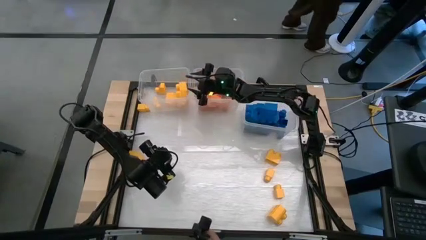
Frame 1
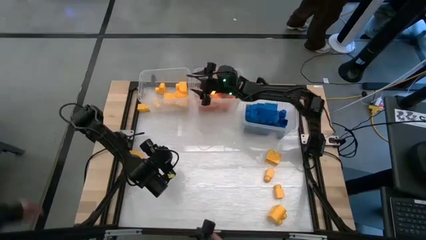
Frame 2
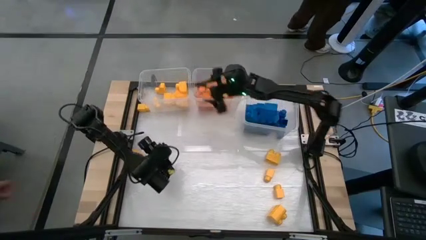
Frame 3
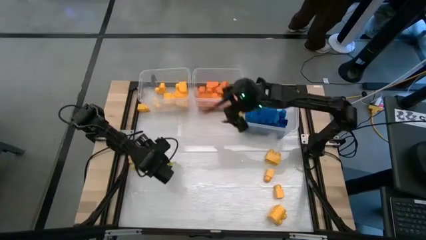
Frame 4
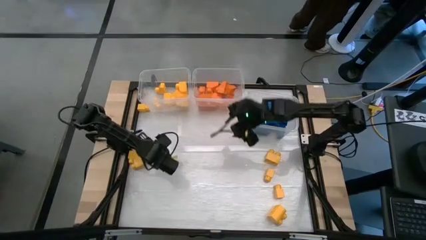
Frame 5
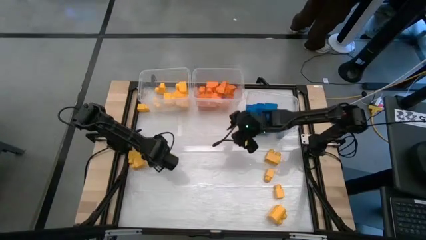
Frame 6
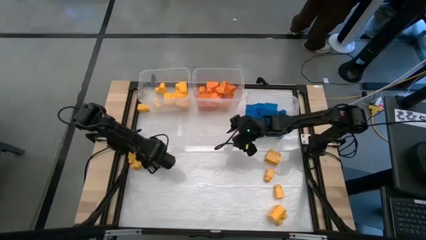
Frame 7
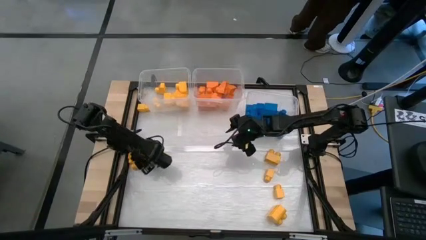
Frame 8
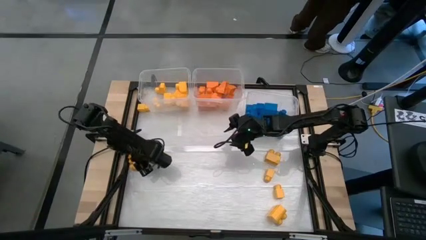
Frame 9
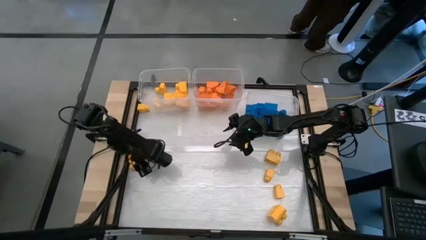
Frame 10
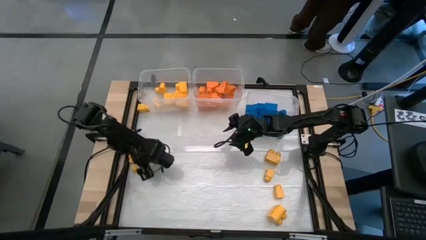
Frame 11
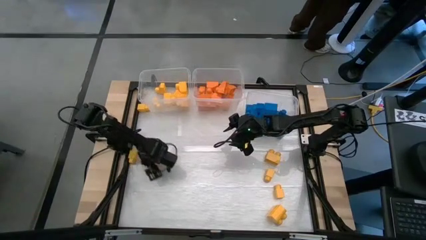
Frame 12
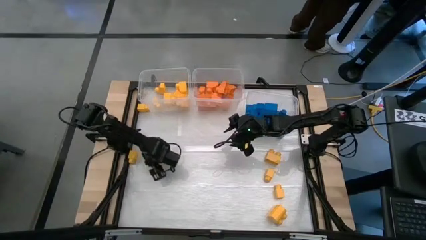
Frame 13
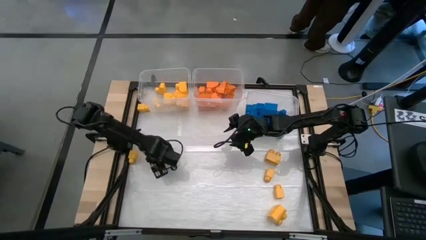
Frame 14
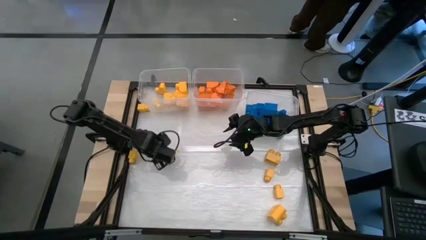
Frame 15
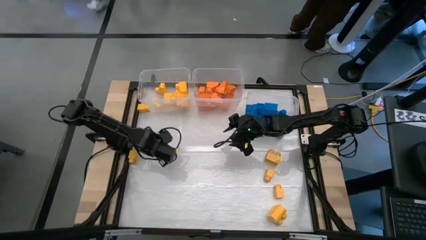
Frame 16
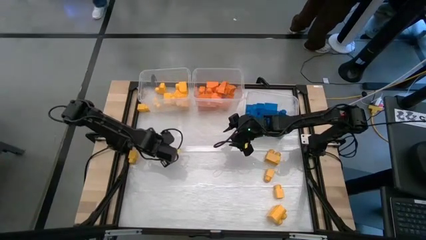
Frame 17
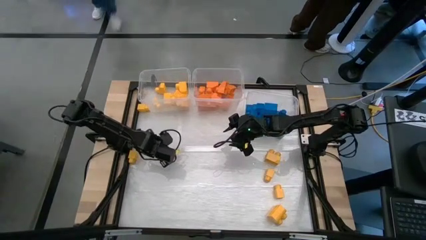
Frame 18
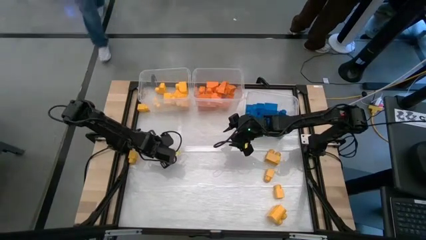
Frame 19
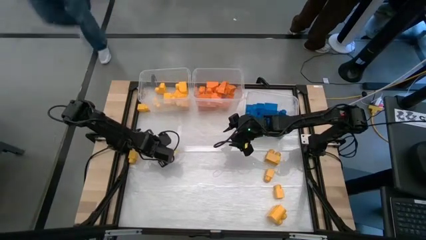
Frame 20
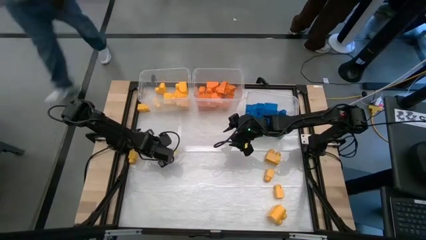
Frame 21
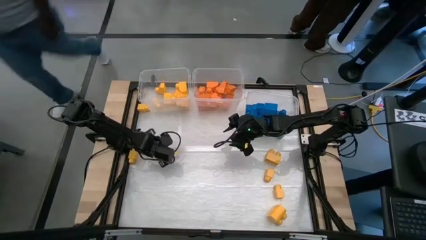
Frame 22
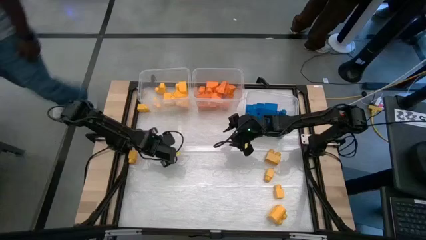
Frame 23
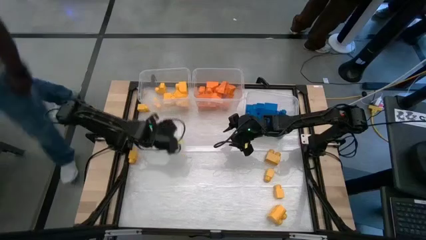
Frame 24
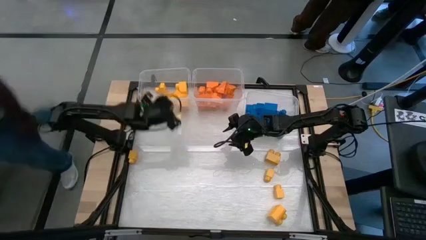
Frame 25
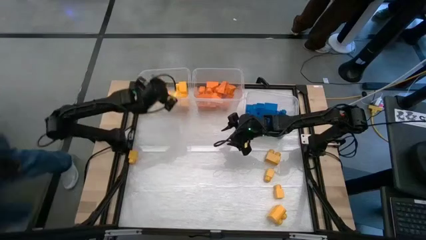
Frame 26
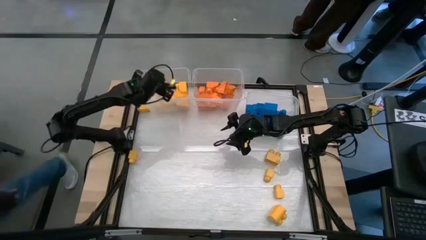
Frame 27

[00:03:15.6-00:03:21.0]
Task: Sort blocks
Put the yellow game piece into the left transparent bin

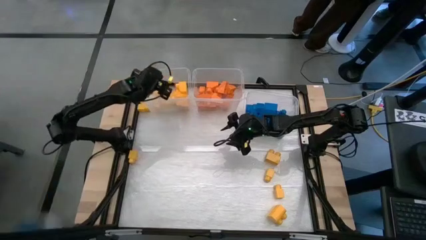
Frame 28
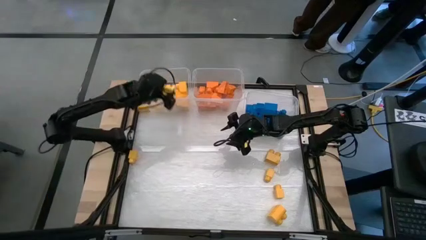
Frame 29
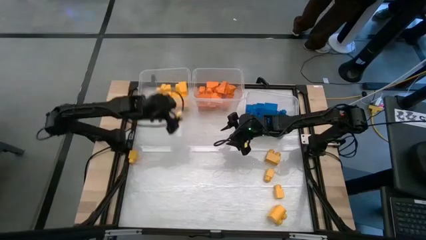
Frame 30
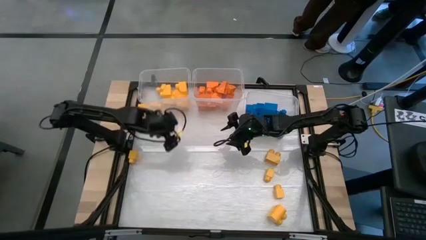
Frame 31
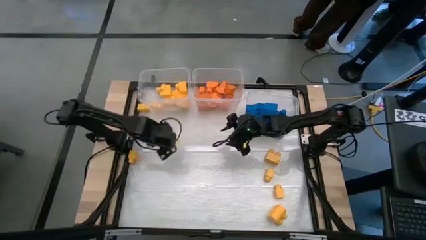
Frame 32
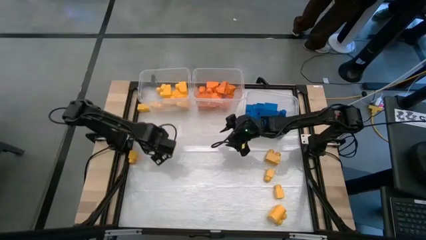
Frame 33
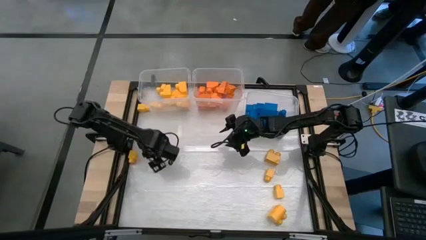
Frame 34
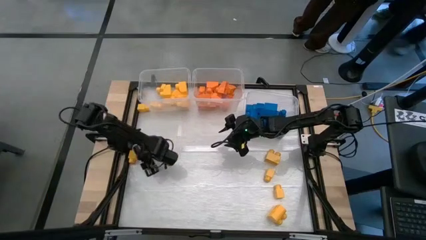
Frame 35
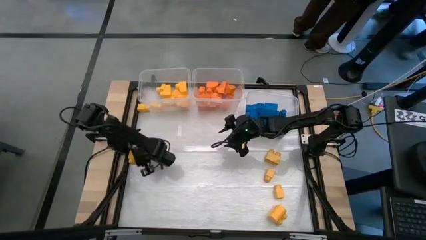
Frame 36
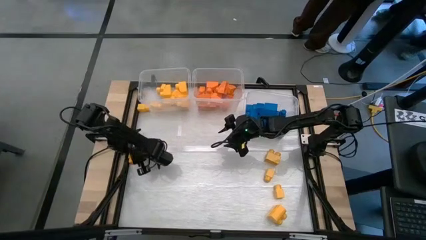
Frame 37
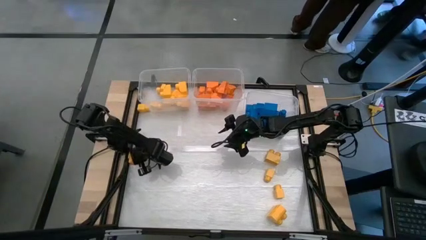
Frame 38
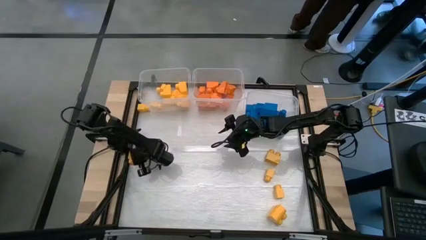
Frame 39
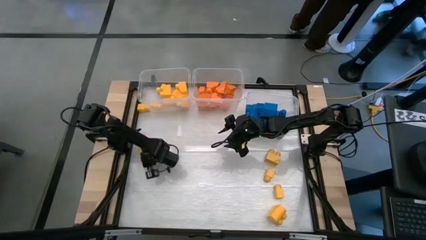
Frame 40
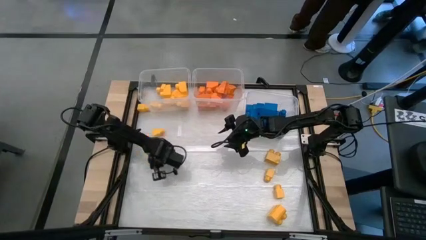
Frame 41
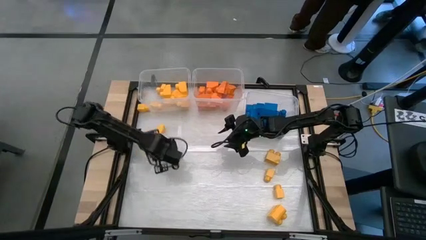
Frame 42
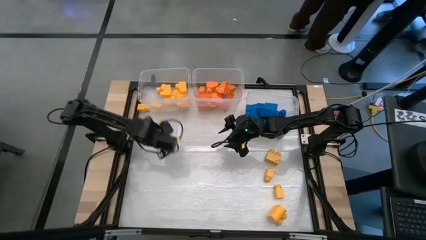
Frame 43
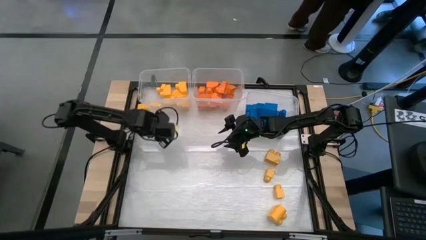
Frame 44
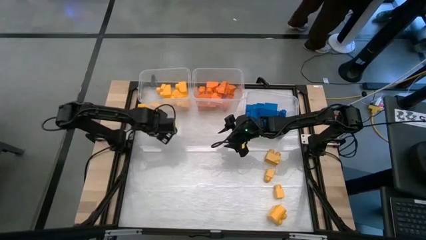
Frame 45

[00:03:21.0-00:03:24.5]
Put the yellow game piece into the left transparent bin

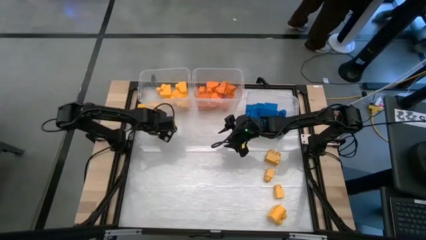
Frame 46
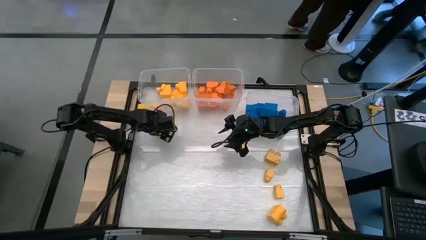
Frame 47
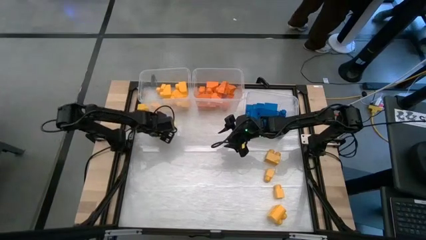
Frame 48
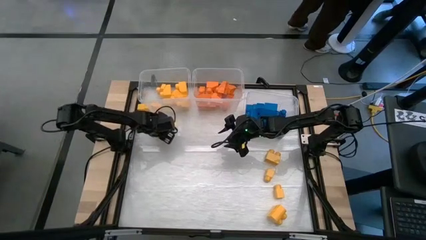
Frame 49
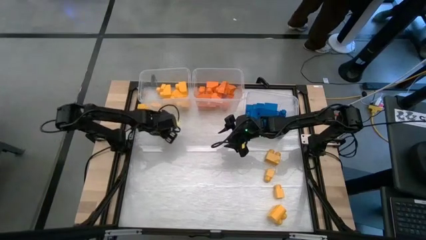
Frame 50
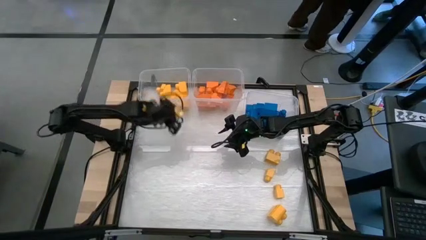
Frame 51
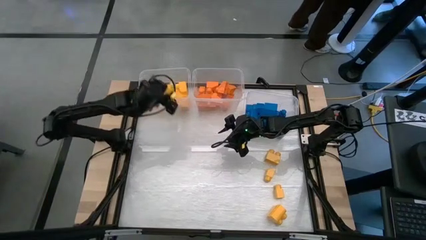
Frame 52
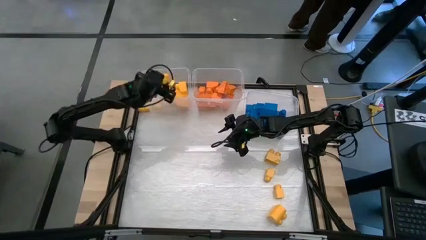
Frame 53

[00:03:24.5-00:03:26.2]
Put the yellow game piece into the left transparent bin

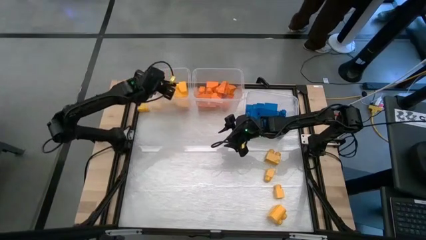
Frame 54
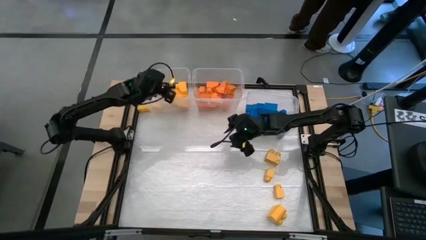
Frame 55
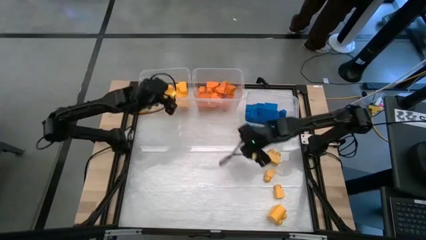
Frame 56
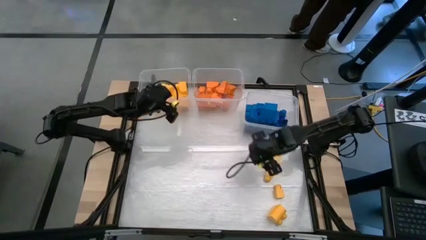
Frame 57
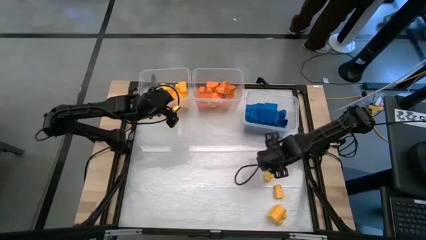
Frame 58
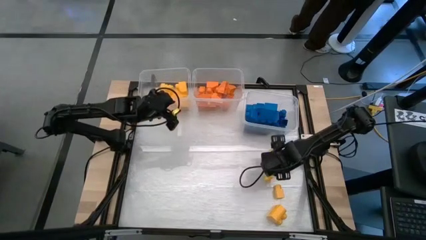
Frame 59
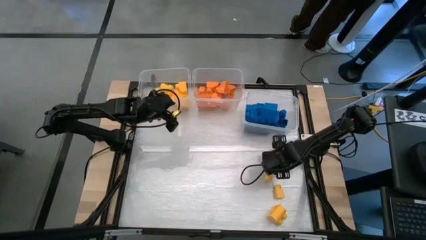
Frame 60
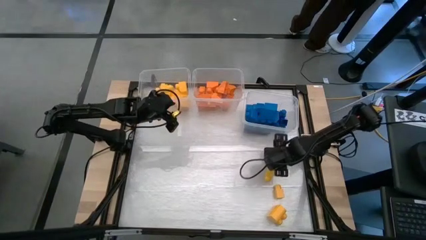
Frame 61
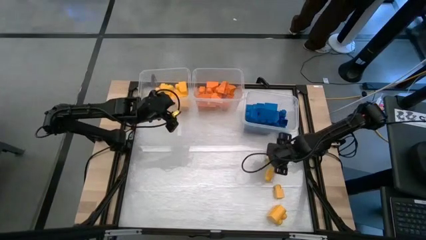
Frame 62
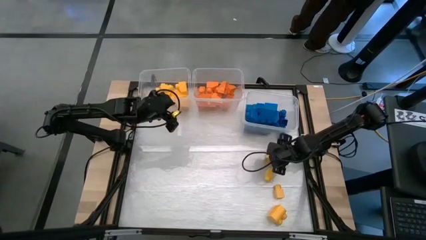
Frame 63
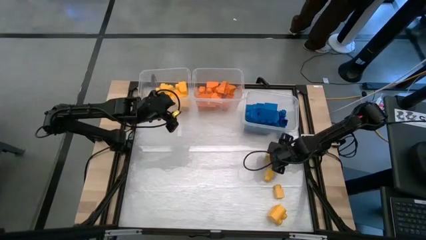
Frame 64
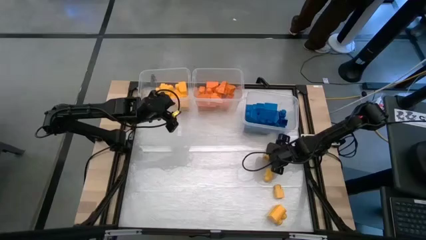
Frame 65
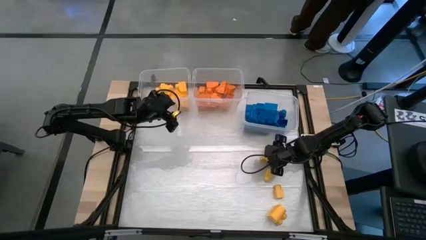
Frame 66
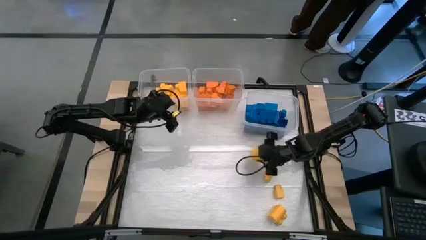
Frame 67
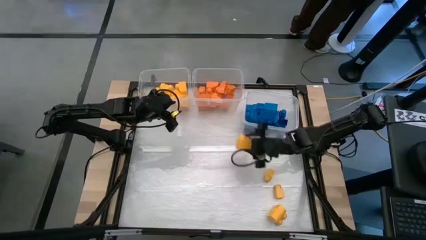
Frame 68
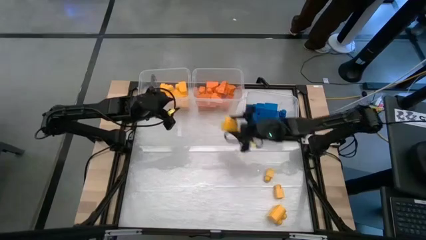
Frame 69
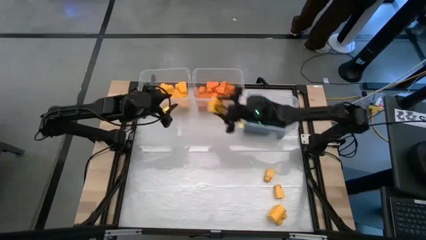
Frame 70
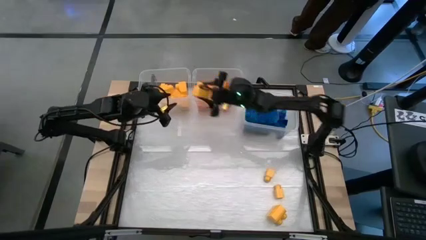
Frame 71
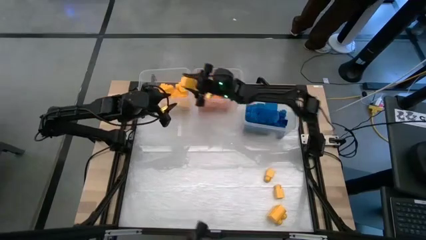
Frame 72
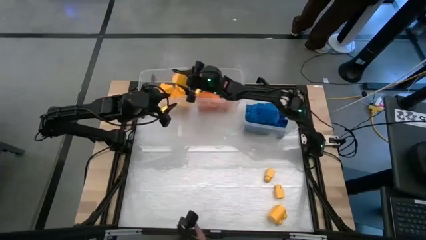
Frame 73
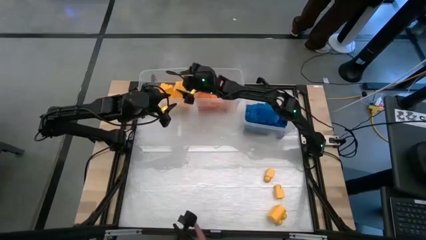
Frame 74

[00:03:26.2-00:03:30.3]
Put the yellow game piece into the left transparent bin

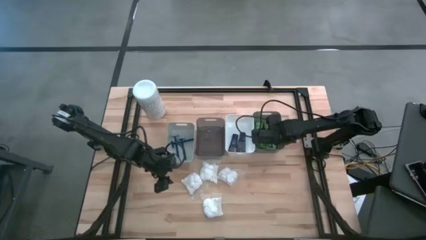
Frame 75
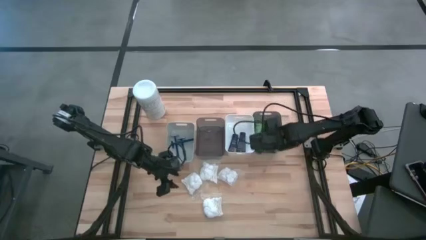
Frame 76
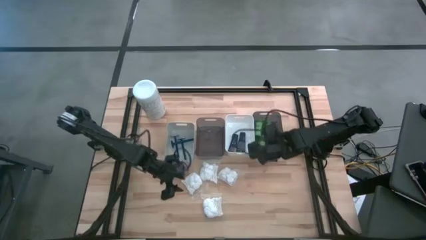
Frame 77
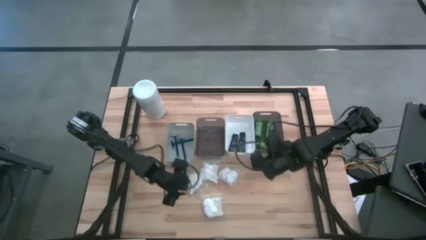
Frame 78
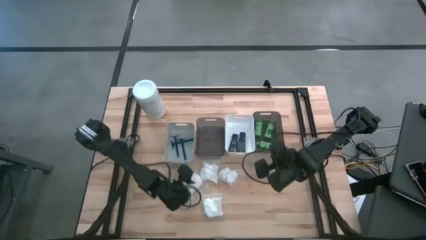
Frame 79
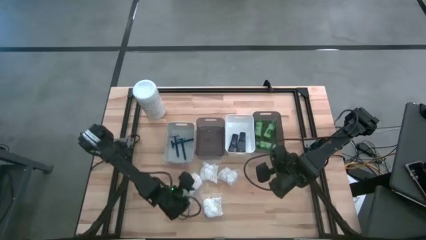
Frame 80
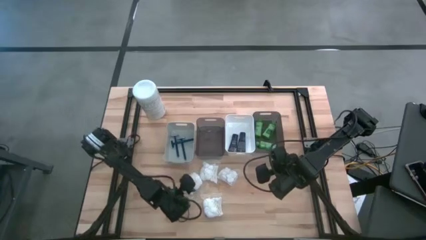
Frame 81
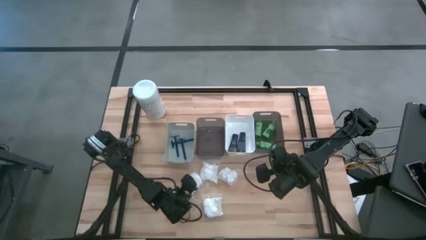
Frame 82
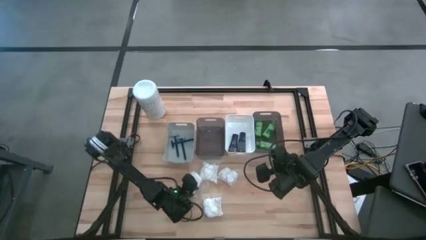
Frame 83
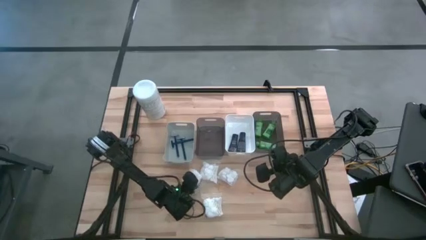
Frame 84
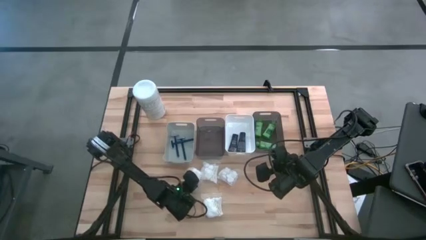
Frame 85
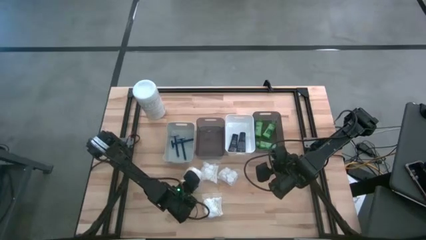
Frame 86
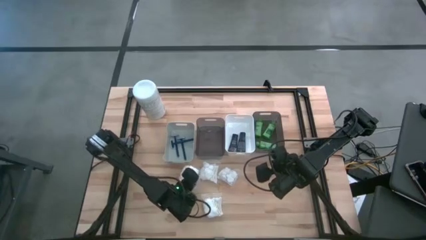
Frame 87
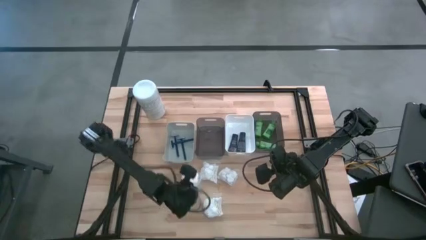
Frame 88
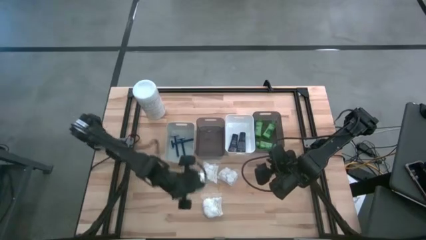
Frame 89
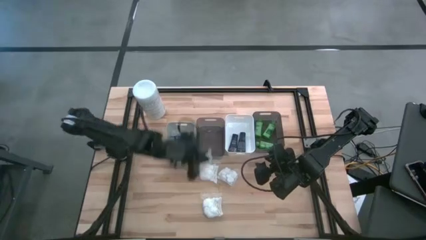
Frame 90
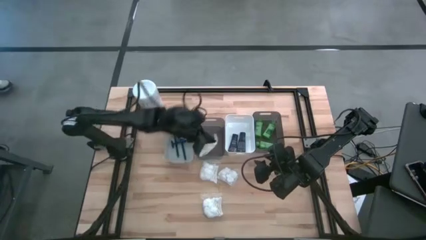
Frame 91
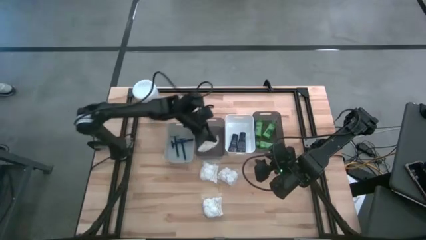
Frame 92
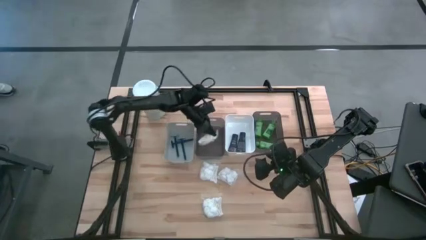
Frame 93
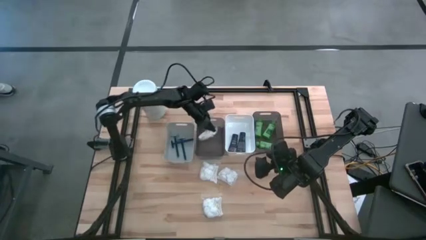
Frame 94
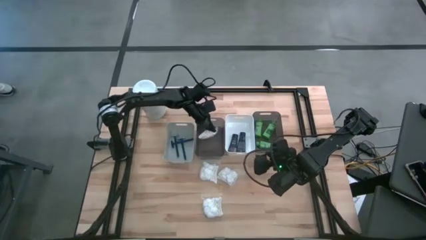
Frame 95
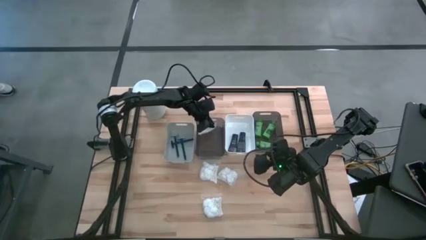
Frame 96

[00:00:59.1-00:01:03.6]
Task: Pick & Place Travel size toiletries
Put the cotton pack into the left black bin
